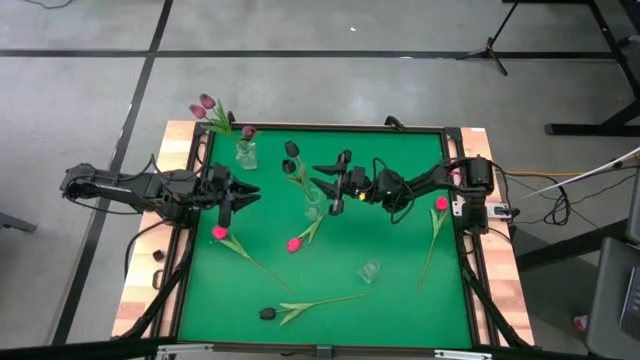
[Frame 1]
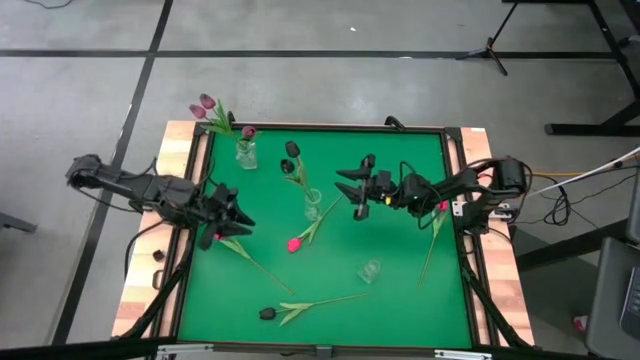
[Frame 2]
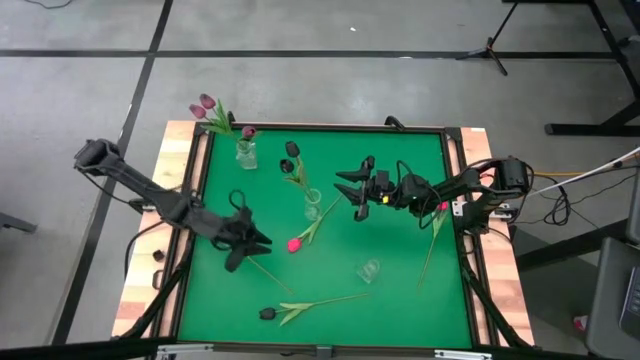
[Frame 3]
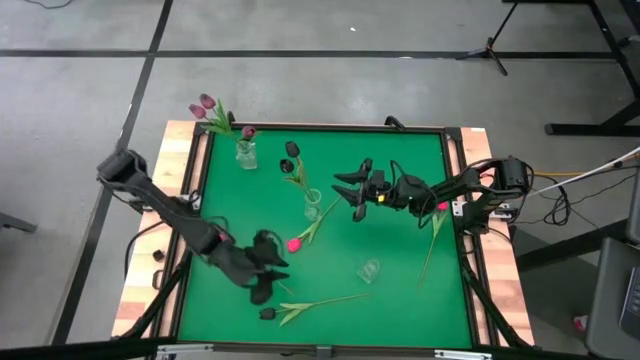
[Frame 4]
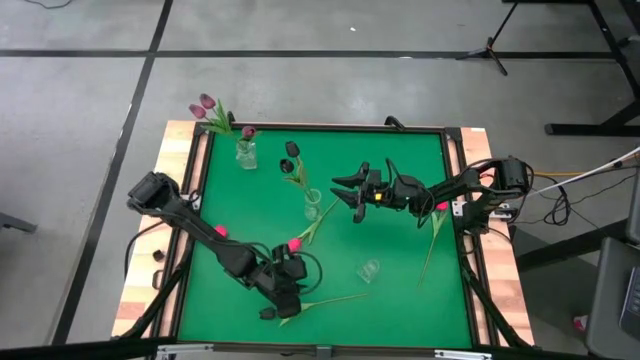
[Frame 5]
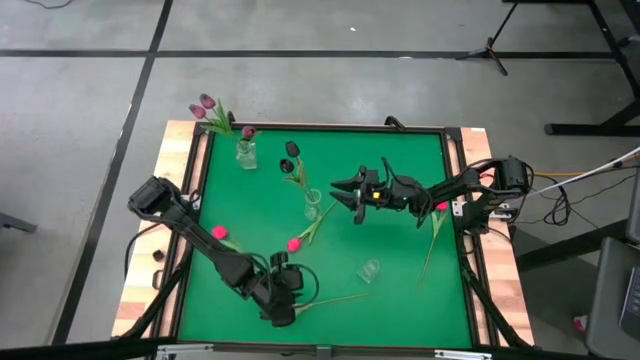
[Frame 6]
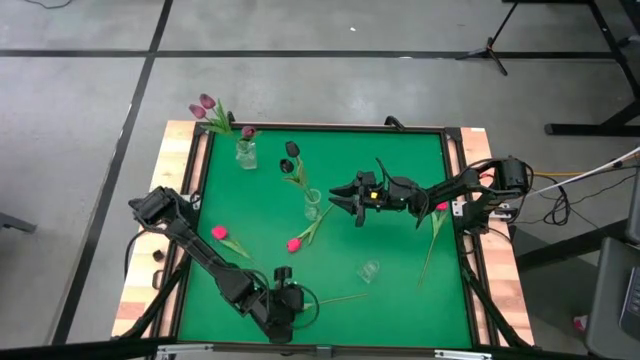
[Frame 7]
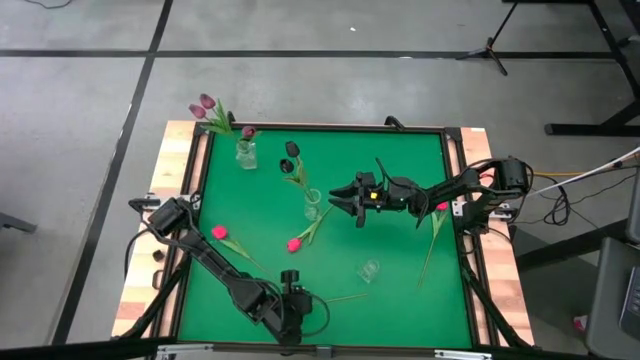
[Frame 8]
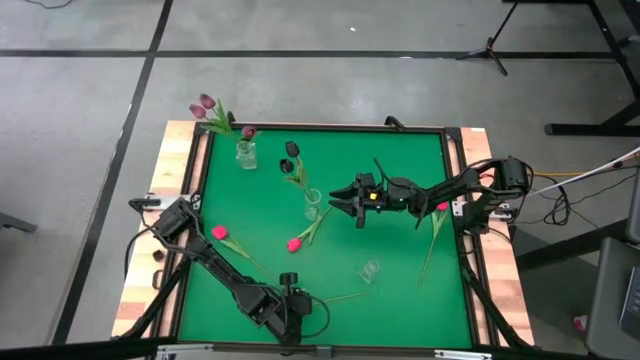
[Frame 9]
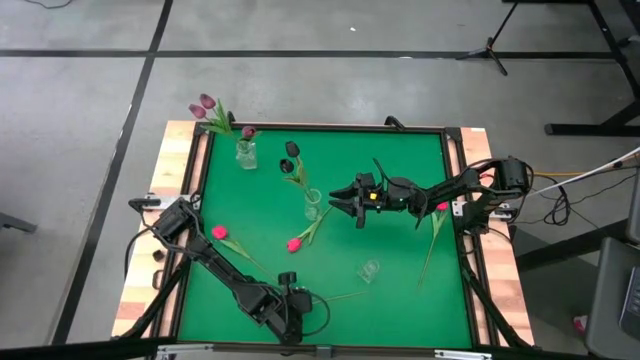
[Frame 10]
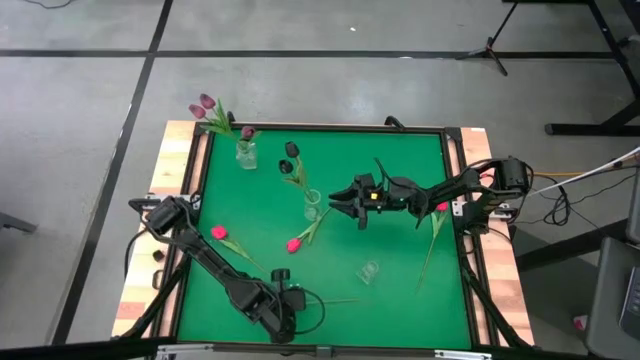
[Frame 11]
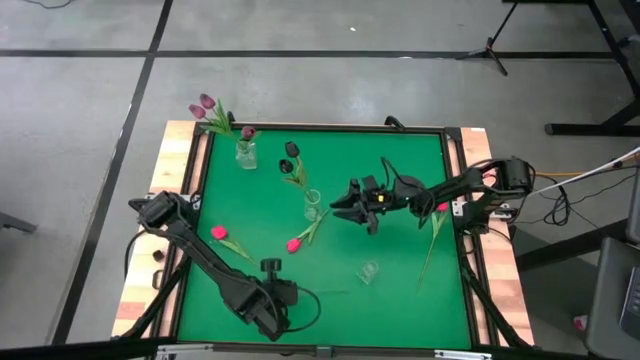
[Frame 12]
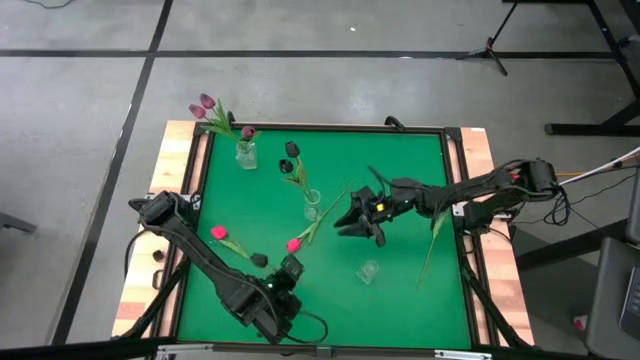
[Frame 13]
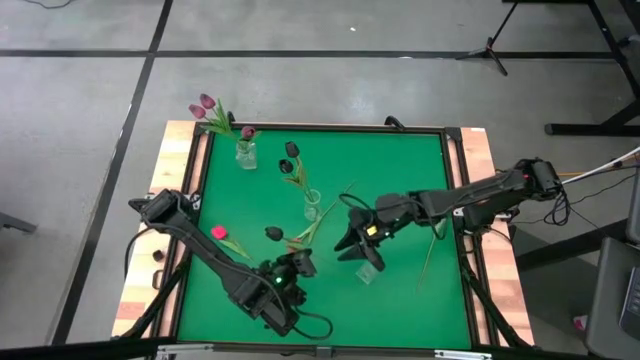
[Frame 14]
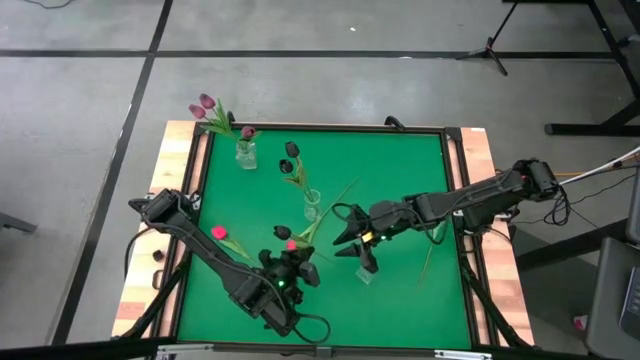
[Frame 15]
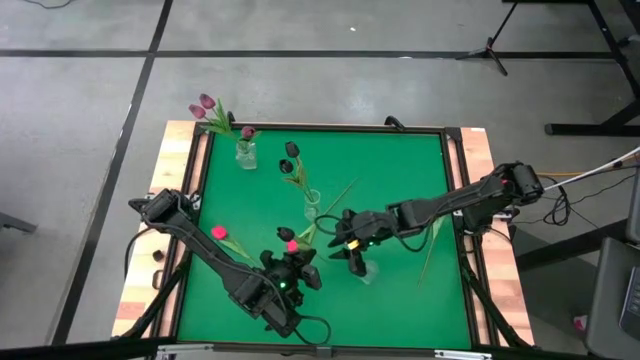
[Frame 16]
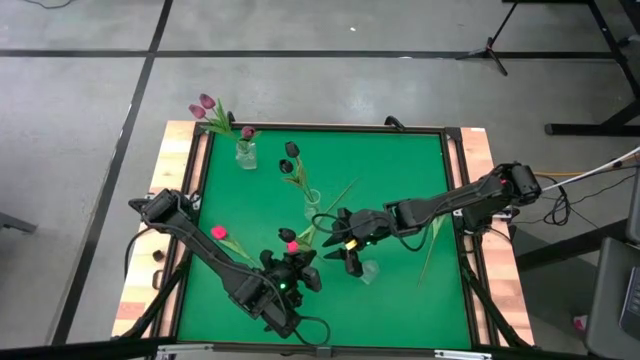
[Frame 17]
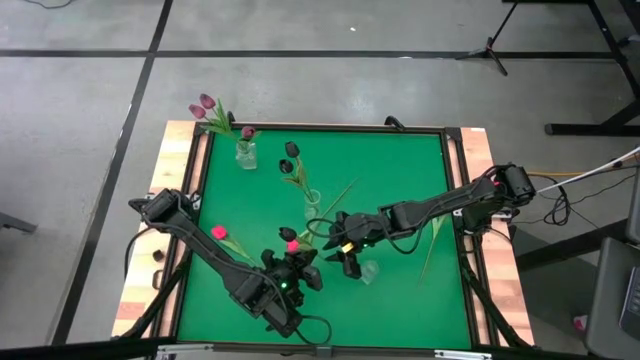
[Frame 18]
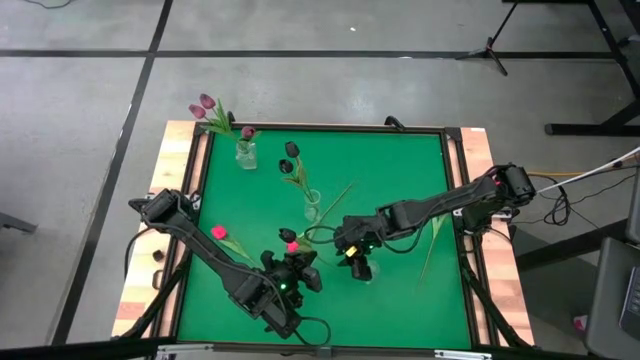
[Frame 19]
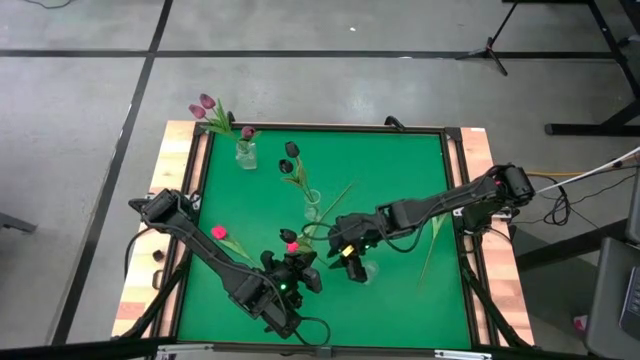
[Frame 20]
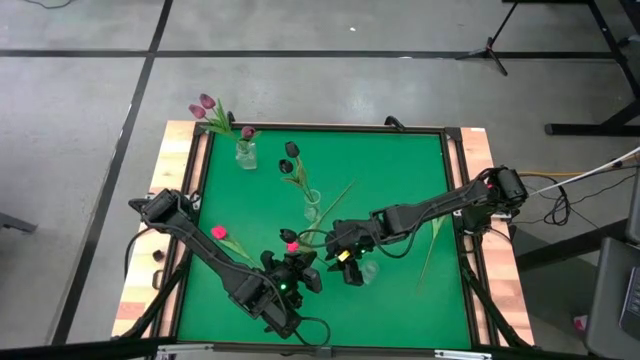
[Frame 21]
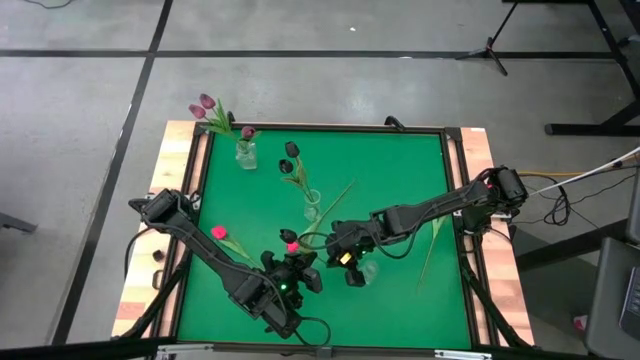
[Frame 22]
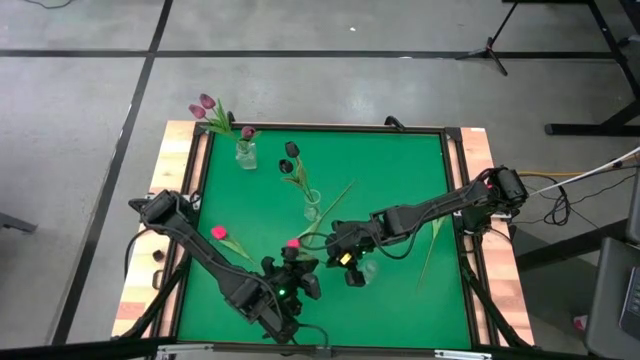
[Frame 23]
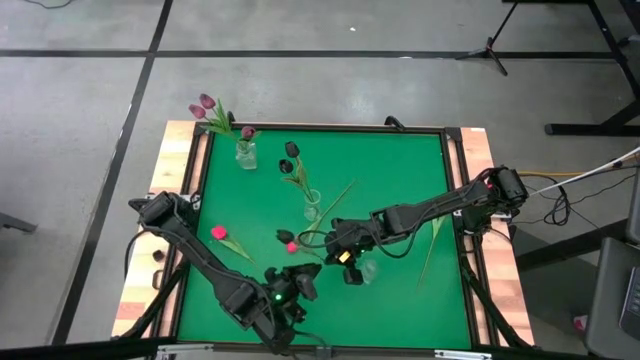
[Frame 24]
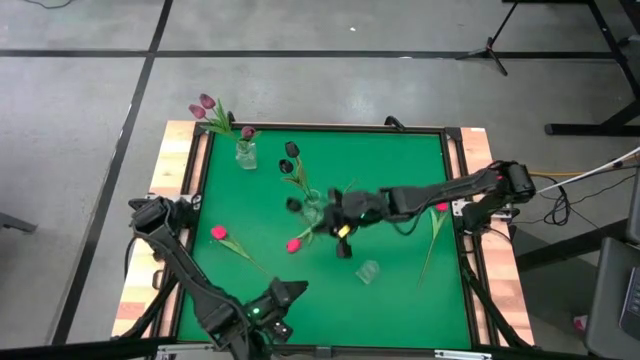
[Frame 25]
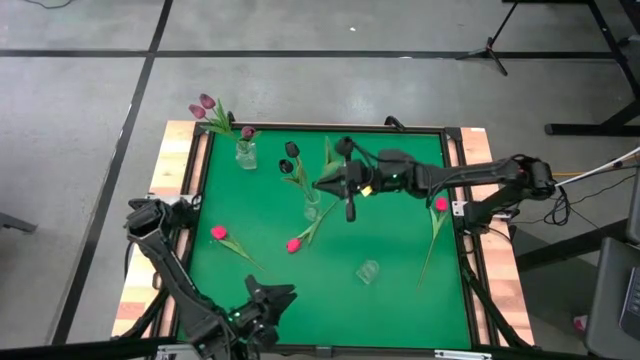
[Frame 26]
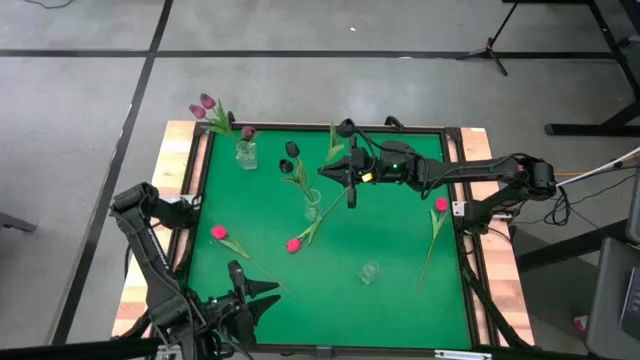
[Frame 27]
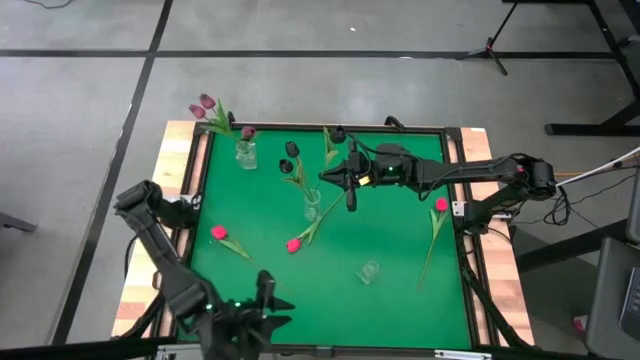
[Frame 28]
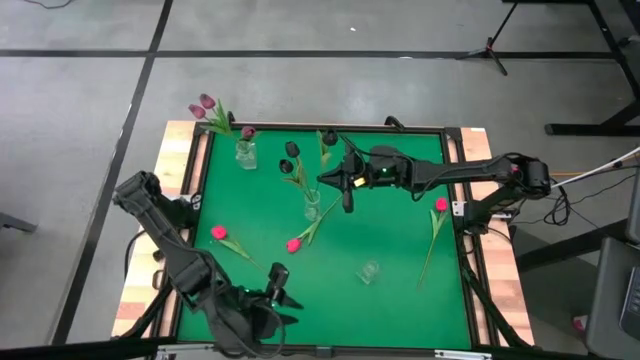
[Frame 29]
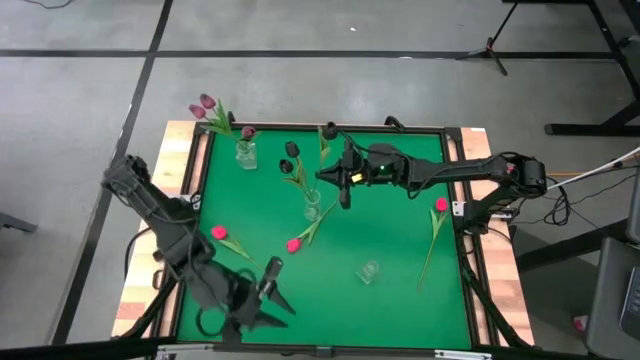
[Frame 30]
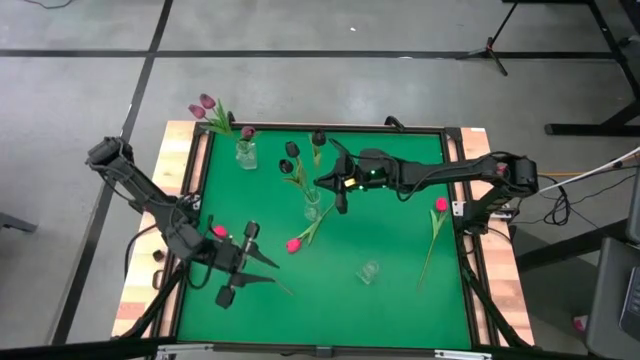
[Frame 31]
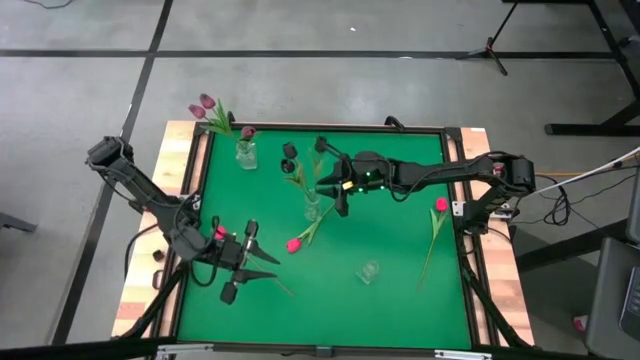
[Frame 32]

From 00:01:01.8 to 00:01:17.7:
Task: Sort flowers into vase by color
Put the black tulip into the center transparent vase

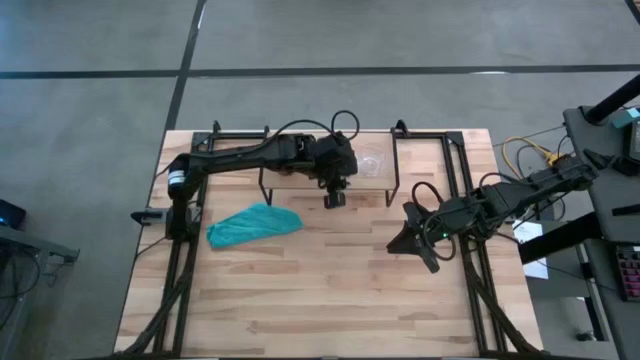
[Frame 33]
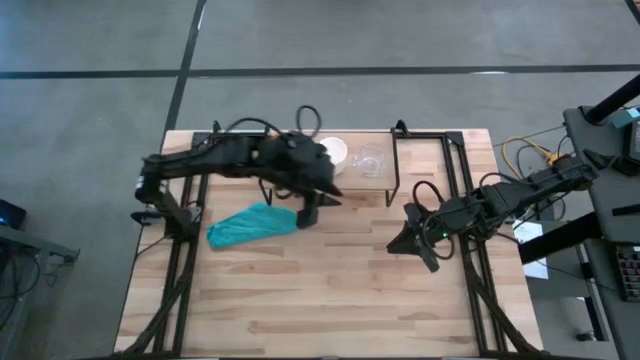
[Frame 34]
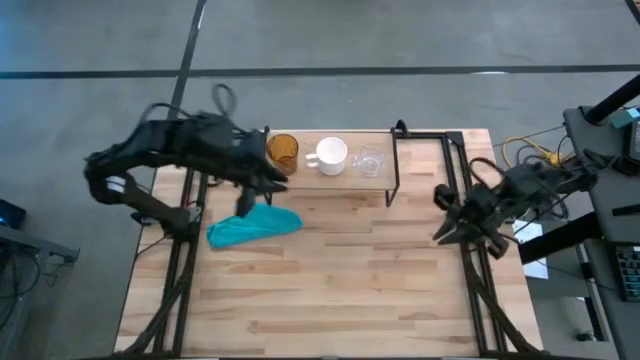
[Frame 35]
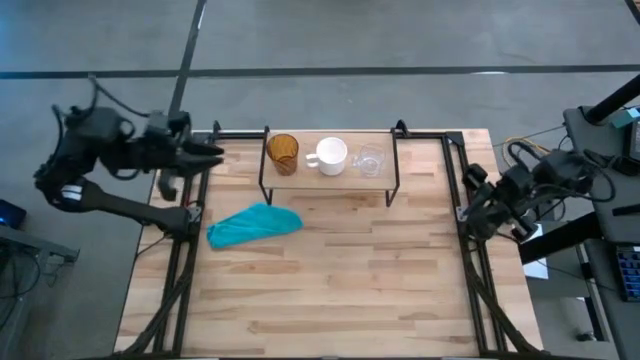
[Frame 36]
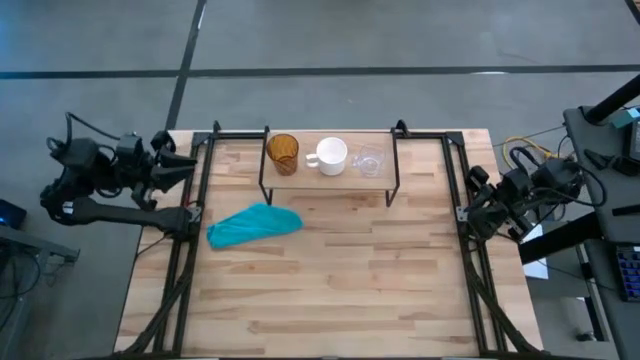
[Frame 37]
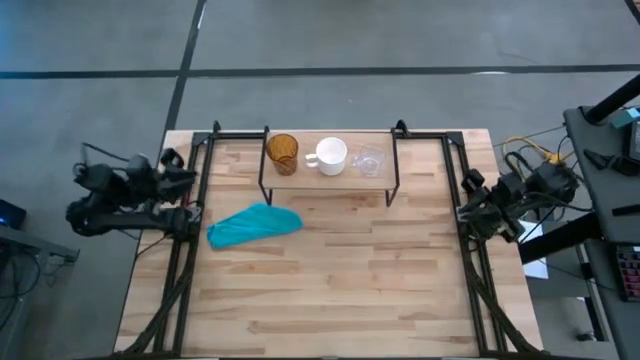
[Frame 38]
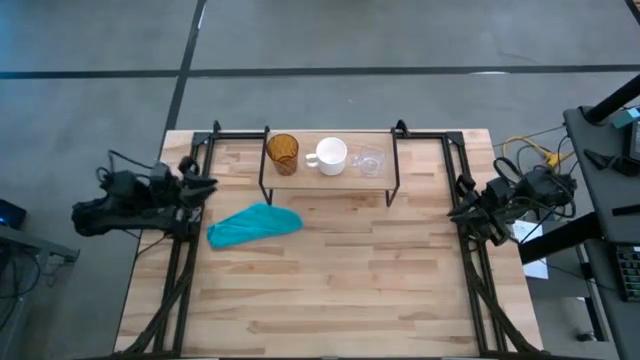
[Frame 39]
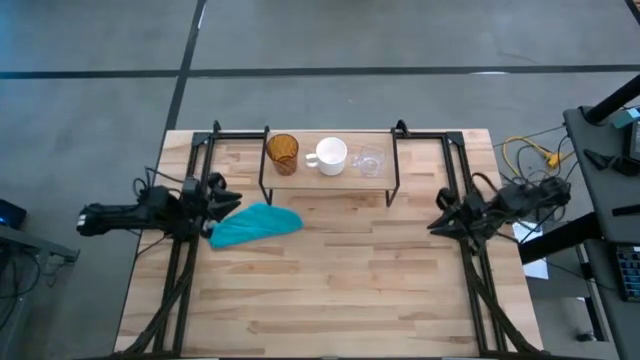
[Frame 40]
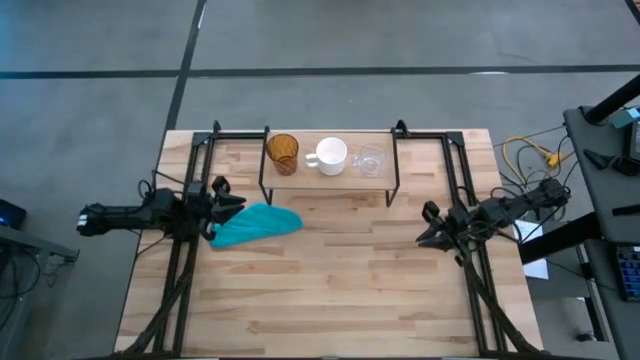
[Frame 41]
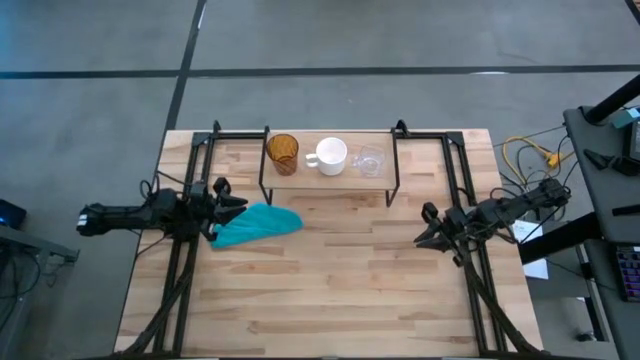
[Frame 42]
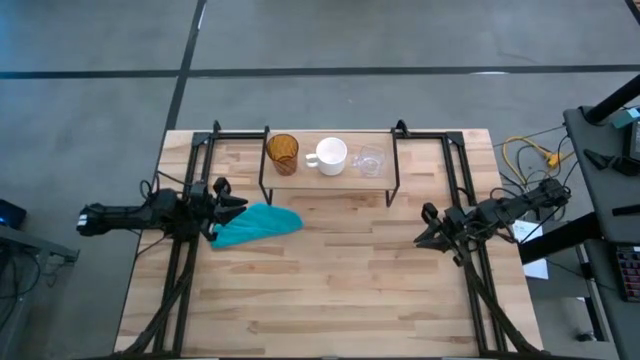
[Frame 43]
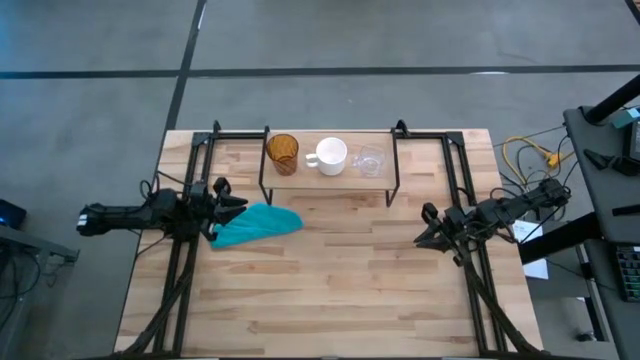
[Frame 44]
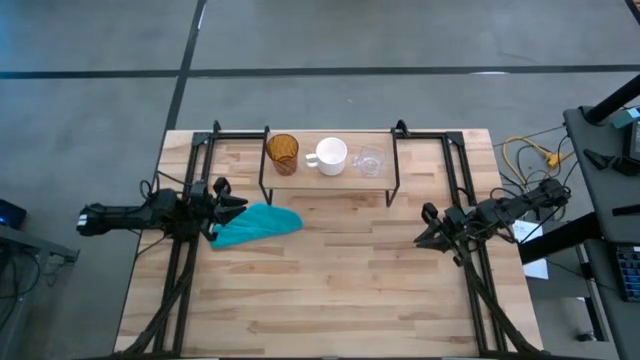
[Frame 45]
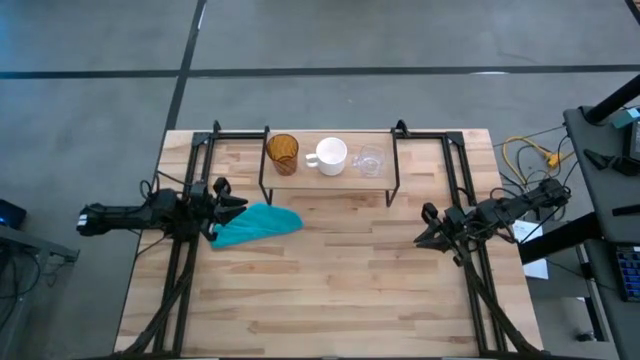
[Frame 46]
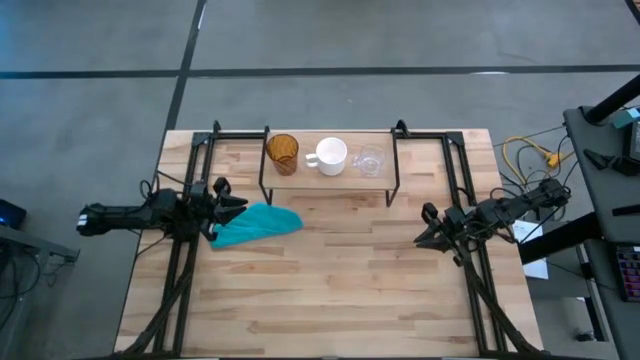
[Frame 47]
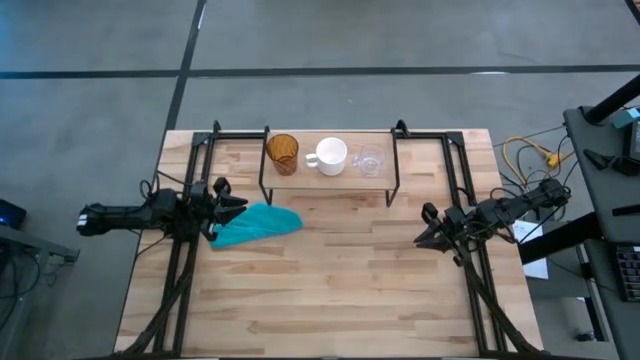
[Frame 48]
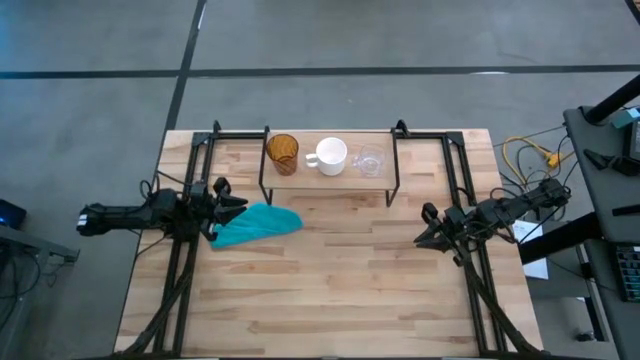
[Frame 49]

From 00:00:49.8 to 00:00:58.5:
Task: Stack small to large cups/mugs on shelf
Return to Home Position
